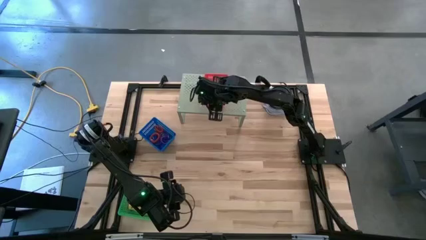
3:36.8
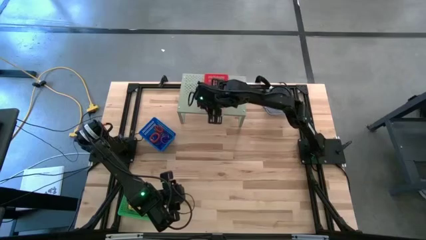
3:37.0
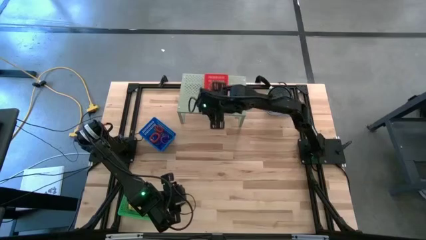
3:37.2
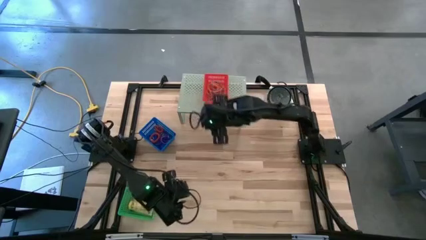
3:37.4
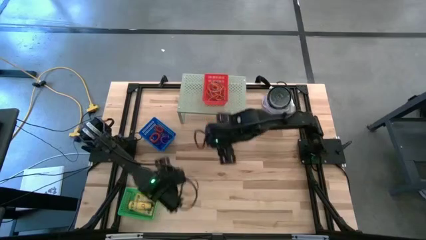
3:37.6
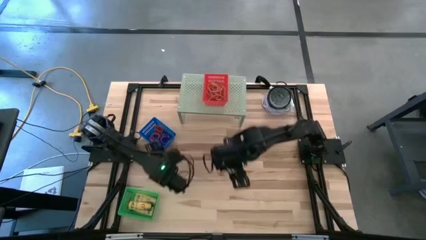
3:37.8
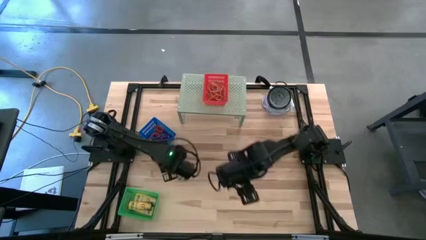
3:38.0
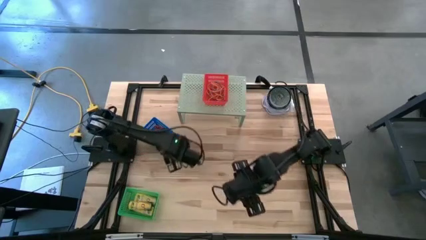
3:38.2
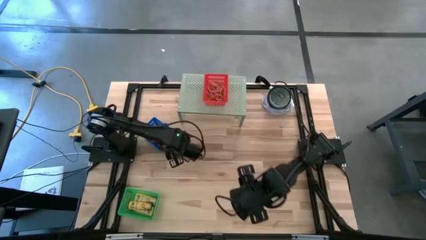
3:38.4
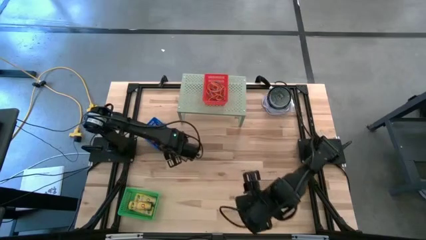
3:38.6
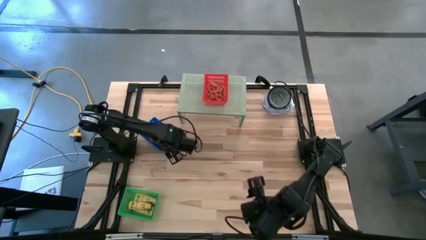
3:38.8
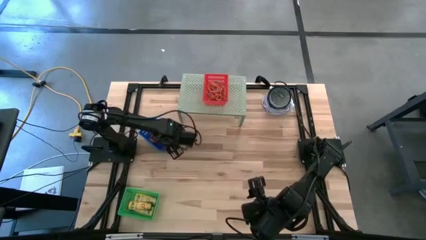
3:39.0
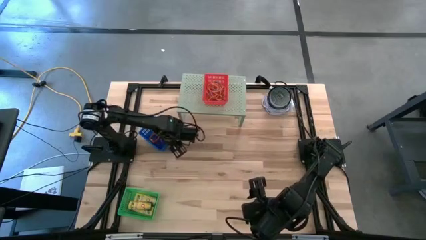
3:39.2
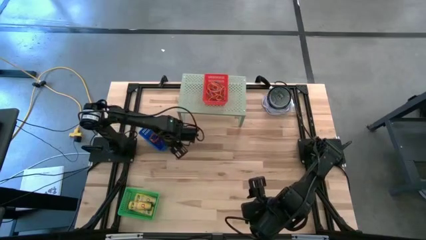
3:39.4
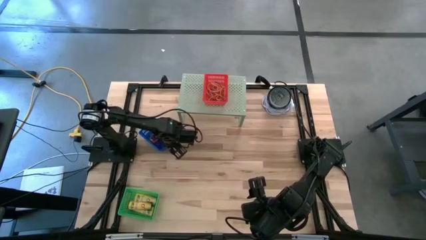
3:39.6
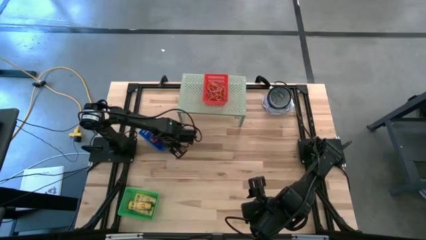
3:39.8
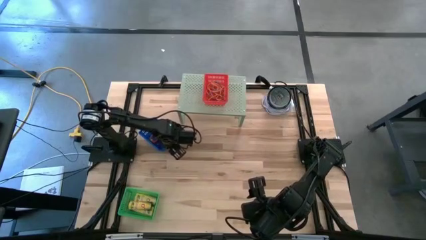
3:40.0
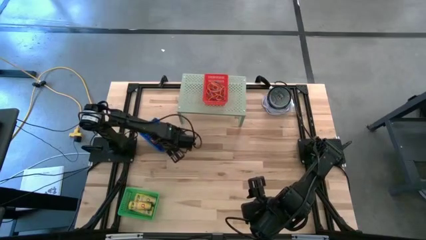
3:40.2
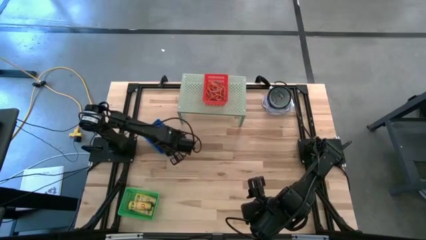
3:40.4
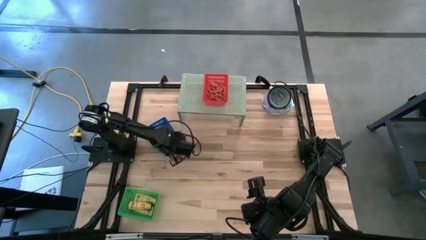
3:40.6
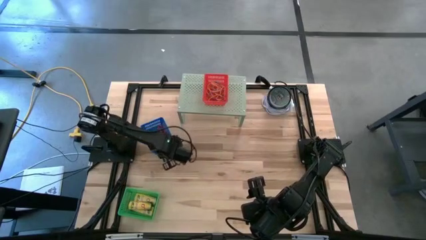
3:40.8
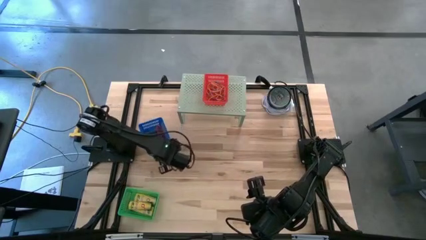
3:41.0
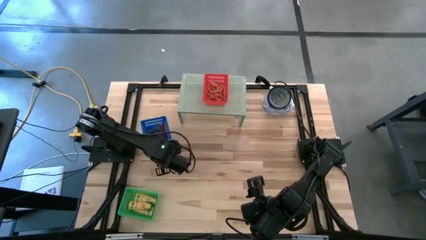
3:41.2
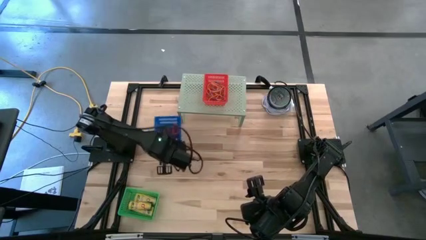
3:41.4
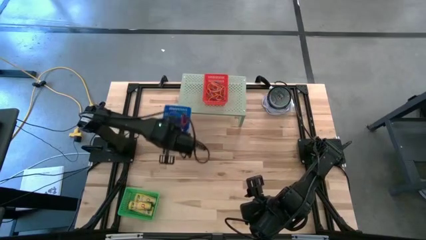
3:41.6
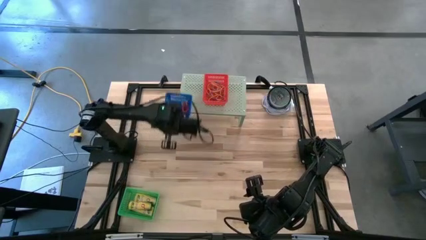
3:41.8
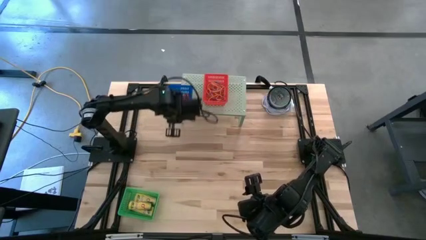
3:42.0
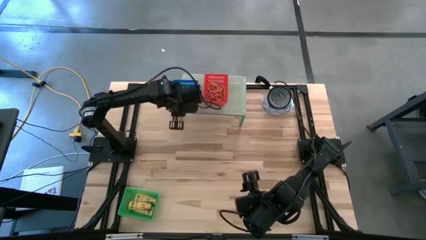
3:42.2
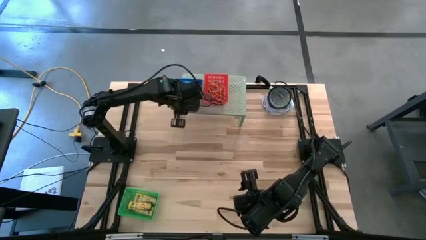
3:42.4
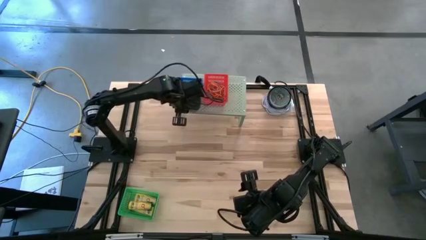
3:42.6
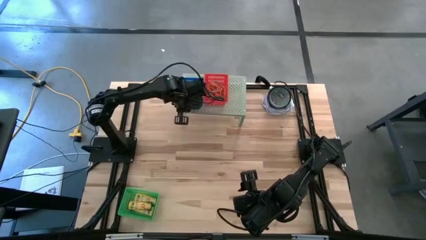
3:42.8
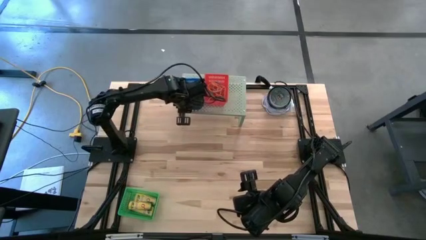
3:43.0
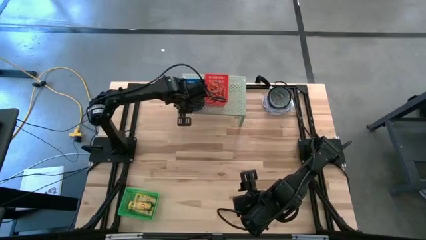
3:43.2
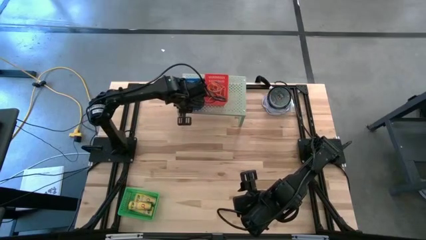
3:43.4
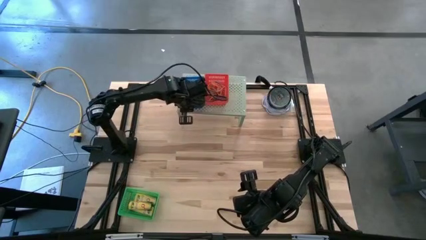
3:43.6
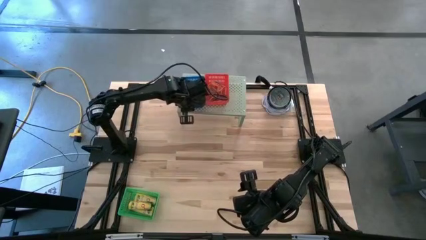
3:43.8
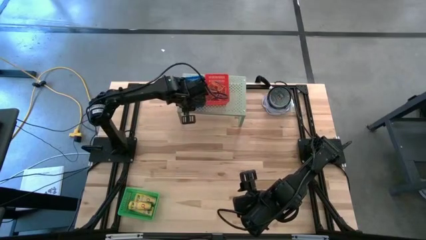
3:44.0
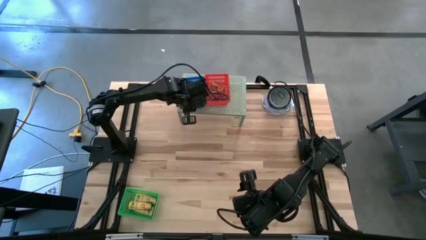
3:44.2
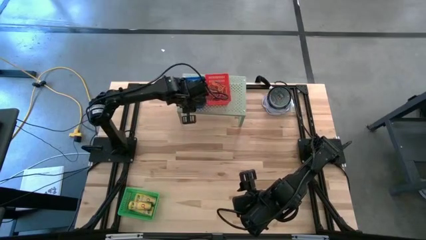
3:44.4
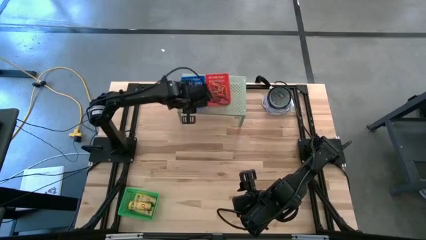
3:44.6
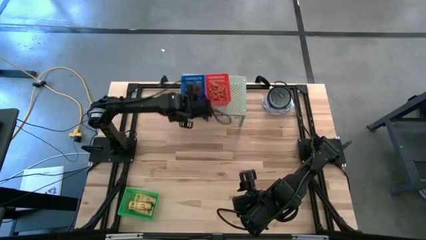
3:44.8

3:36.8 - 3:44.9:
Task: Pick & Place Office Desk Supplies
Put the blue bin with spring keychains on the shelf

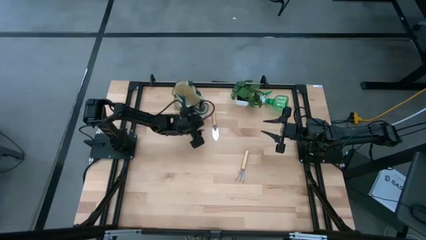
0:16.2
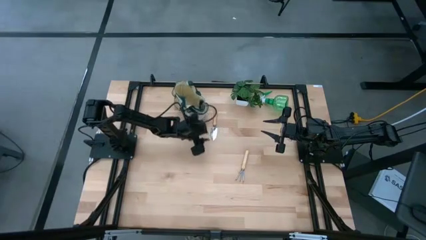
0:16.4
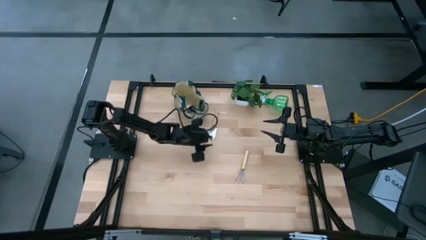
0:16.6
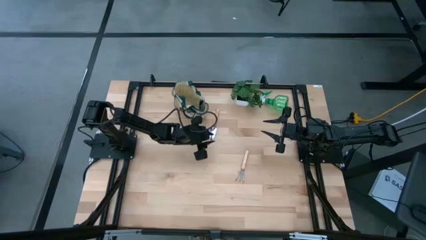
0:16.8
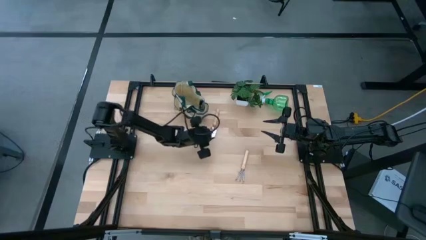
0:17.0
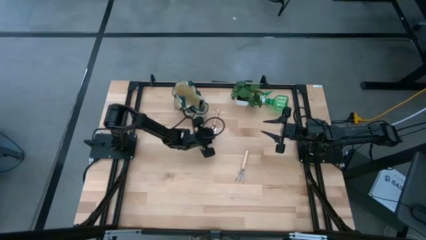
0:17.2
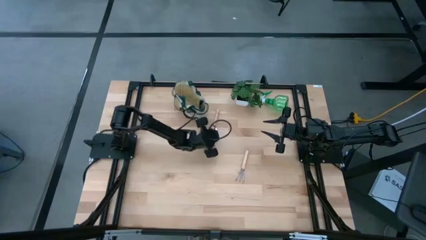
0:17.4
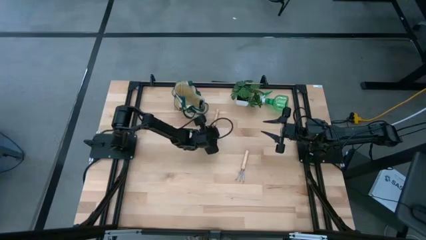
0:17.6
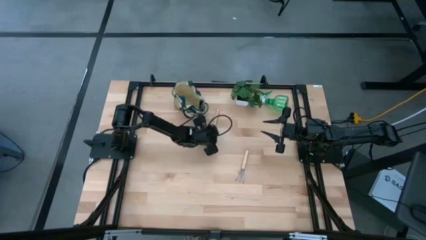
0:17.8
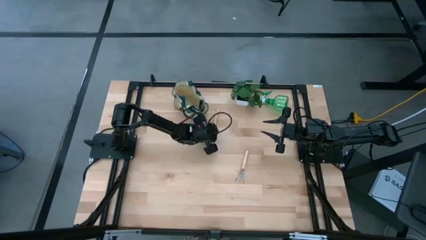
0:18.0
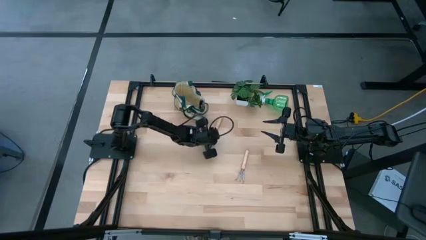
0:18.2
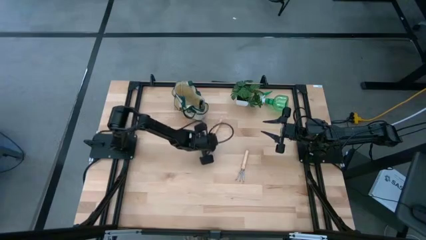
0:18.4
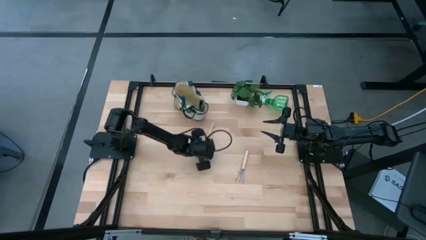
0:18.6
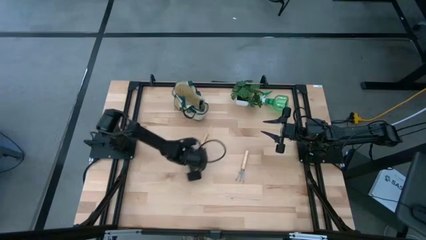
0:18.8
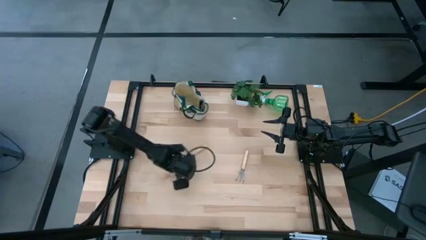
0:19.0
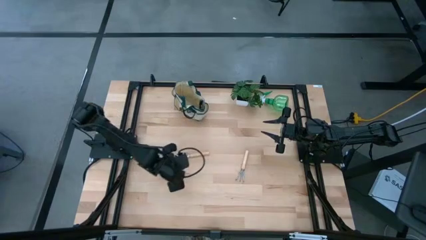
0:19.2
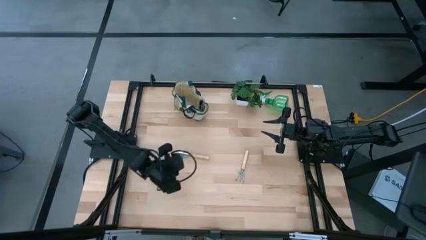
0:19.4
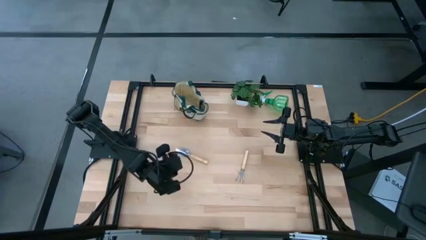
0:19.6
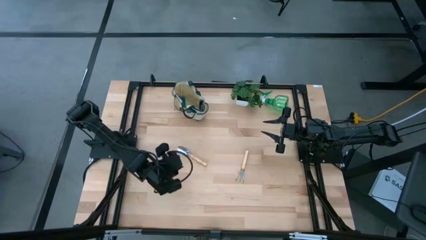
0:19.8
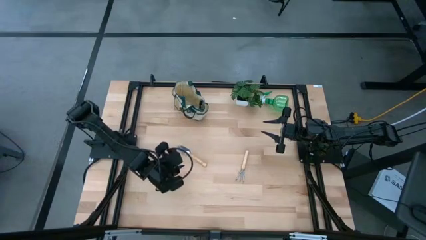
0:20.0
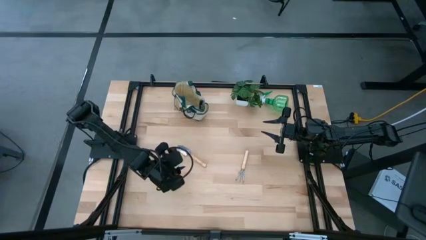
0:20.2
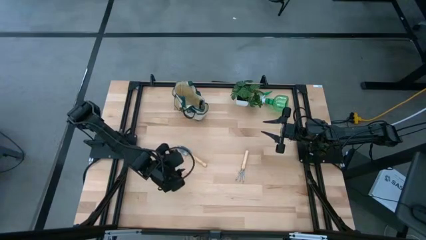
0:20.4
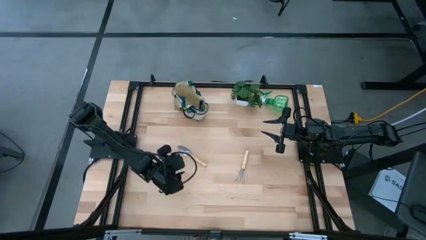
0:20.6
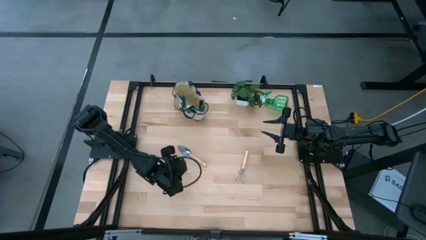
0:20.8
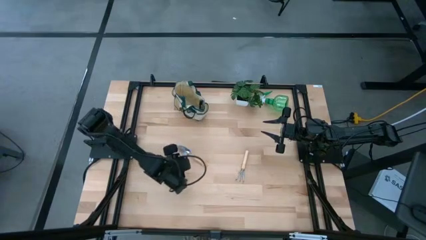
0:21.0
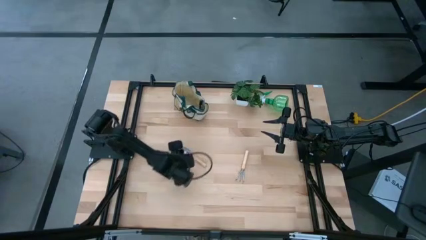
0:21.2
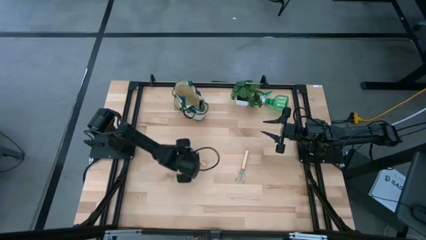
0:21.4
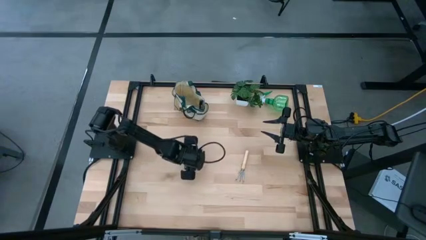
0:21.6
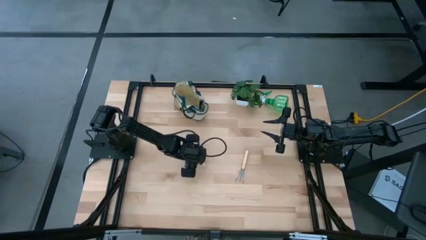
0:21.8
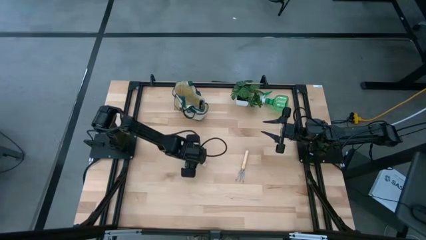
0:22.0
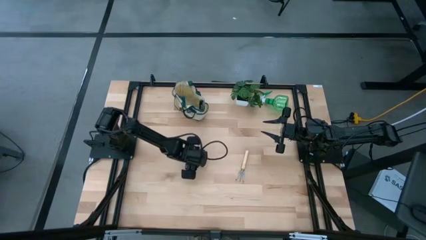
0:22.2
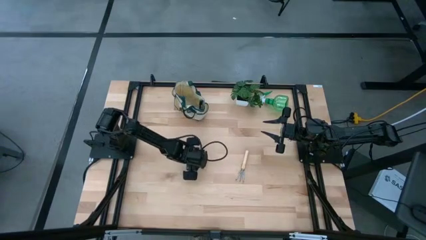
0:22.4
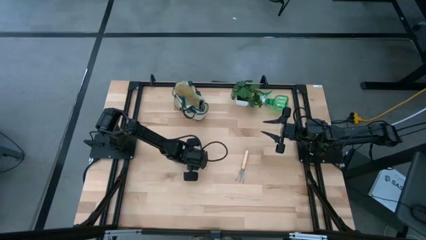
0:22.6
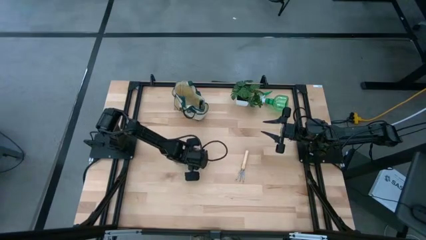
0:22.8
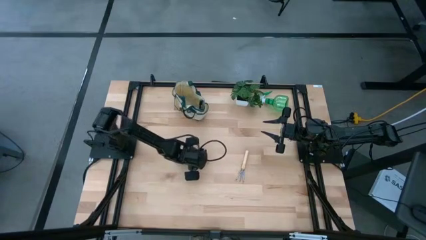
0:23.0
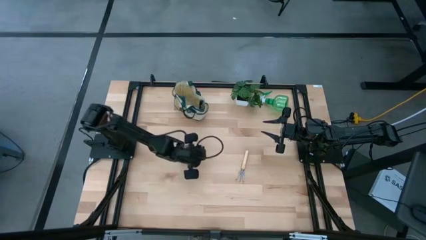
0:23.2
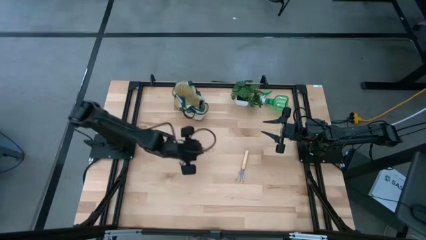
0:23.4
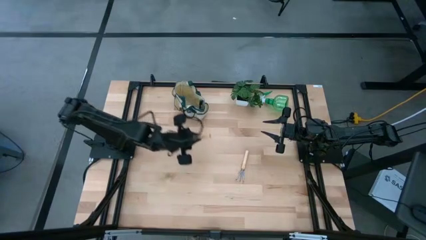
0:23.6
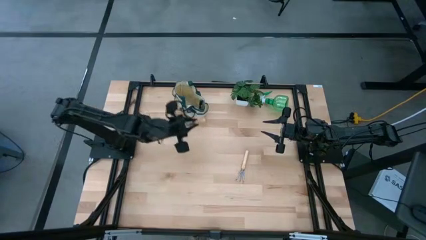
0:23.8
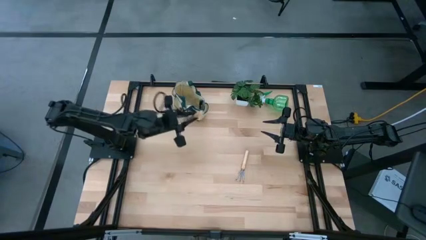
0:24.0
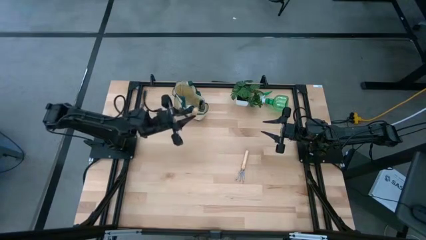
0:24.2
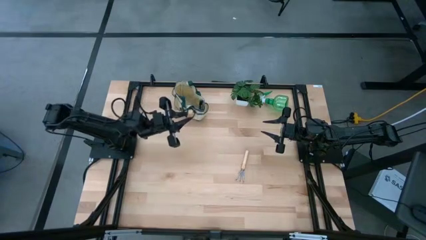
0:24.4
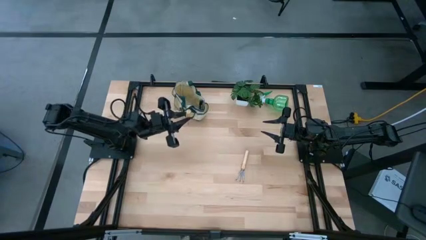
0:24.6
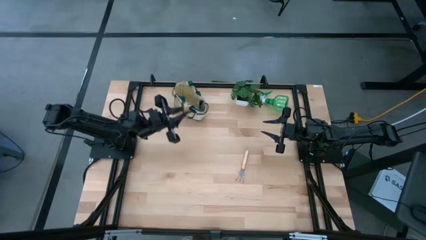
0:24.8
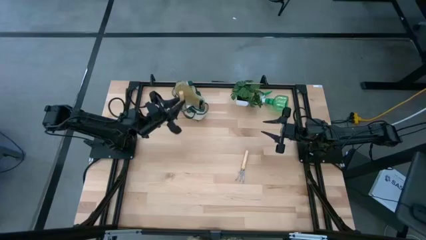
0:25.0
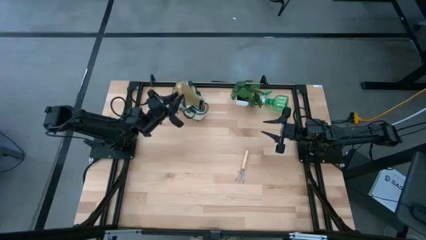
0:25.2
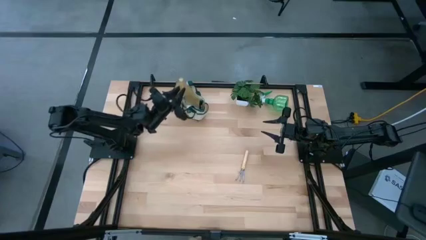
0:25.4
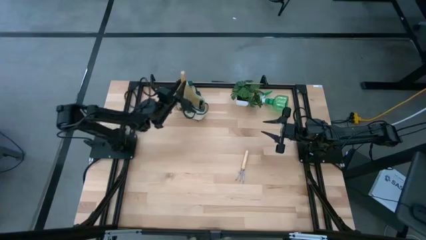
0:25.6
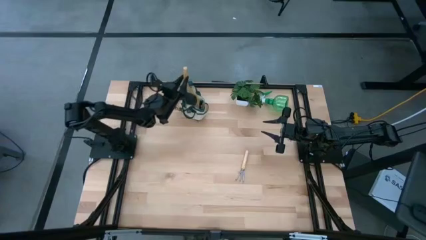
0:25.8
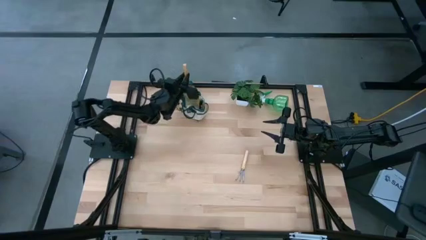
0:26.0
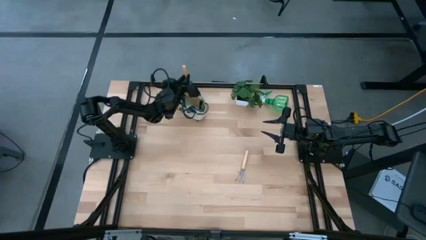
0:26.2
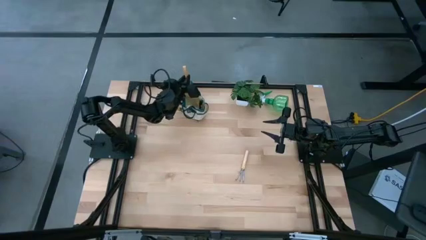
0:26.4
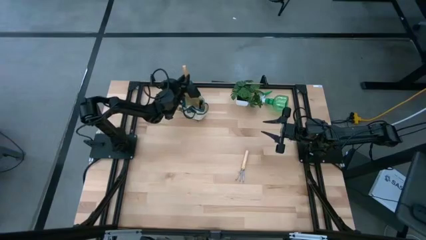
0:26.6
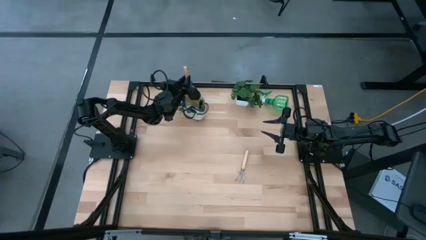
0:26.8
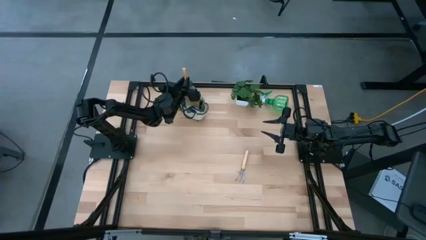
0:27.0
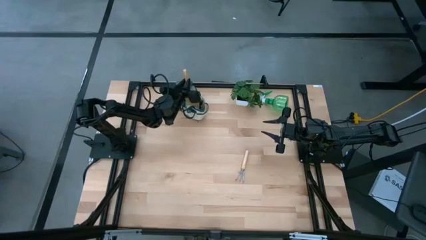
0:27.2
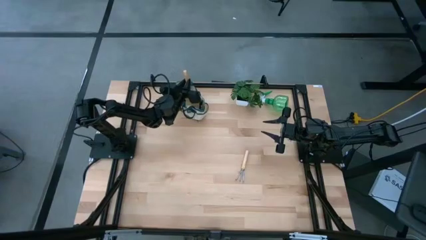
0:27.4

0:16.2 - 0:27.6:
Task: Pick & Place Garden tools in Gardening bag
Put the brown trowel into the gardening bag
